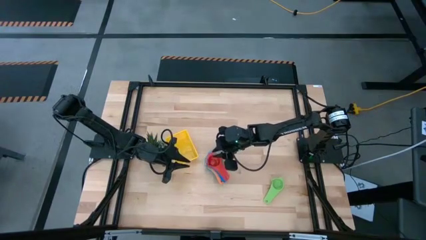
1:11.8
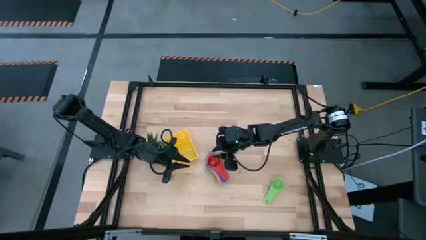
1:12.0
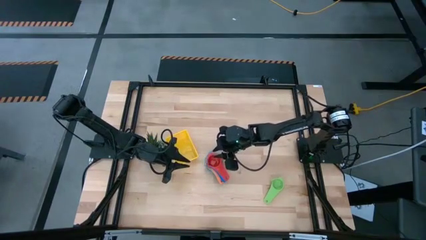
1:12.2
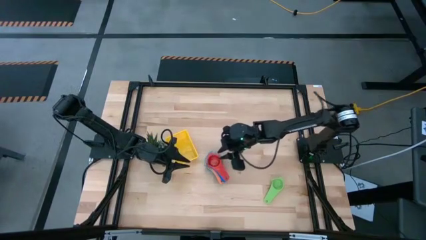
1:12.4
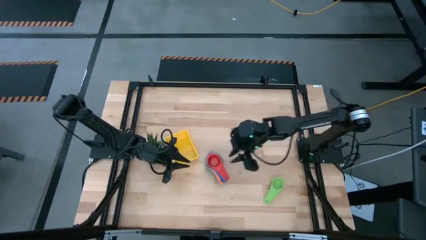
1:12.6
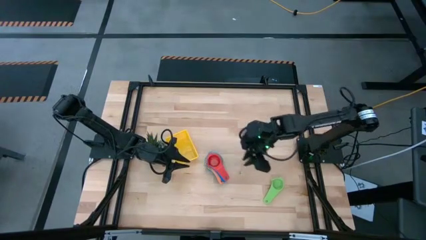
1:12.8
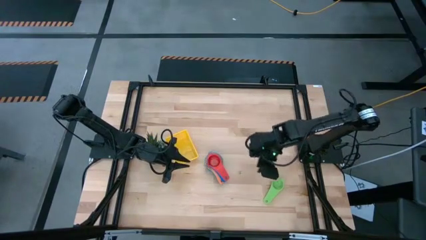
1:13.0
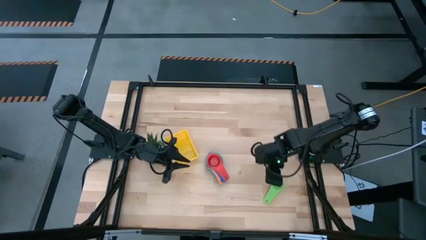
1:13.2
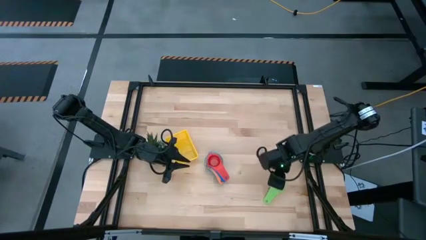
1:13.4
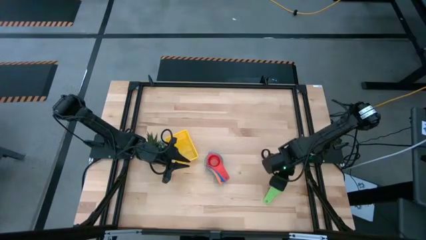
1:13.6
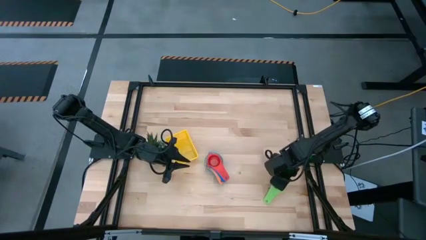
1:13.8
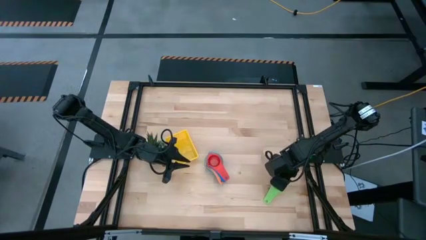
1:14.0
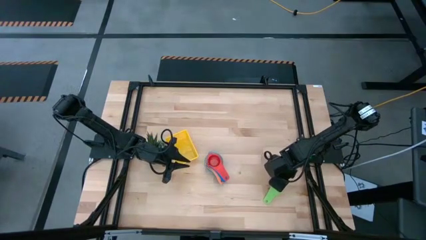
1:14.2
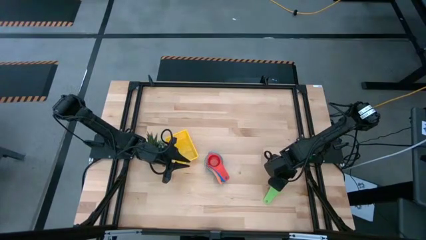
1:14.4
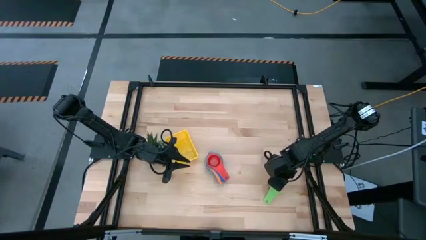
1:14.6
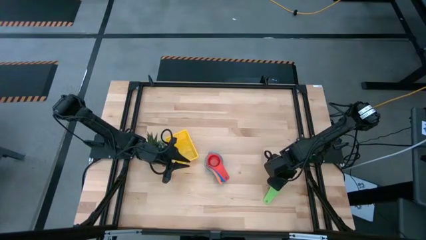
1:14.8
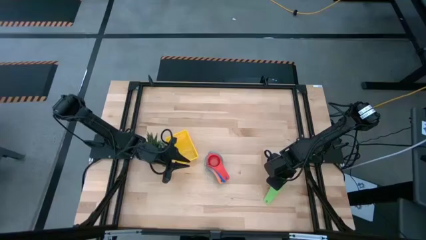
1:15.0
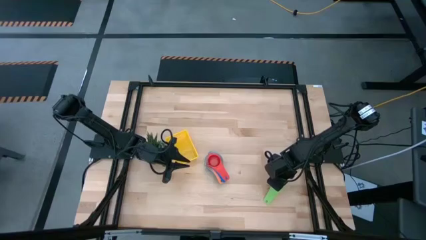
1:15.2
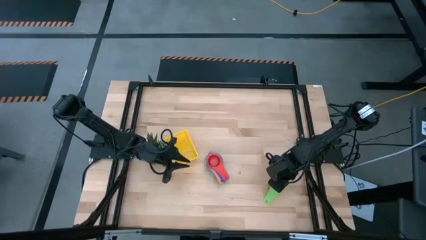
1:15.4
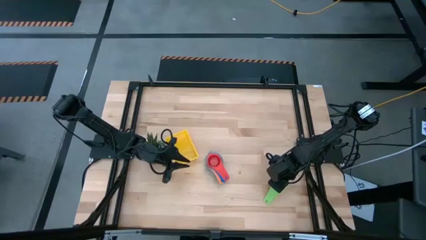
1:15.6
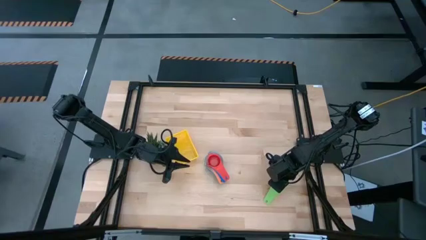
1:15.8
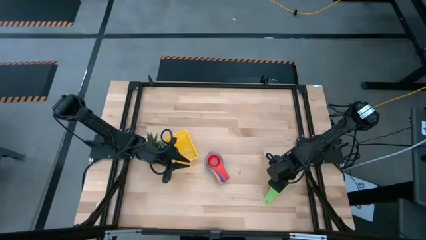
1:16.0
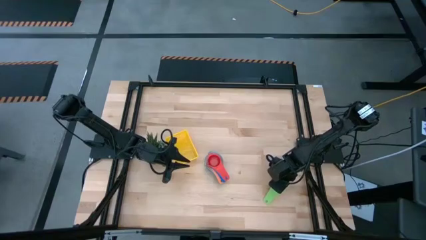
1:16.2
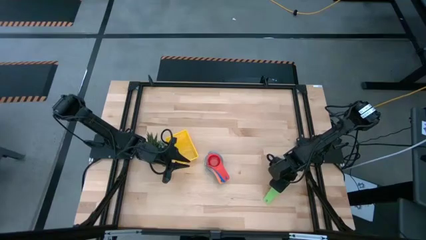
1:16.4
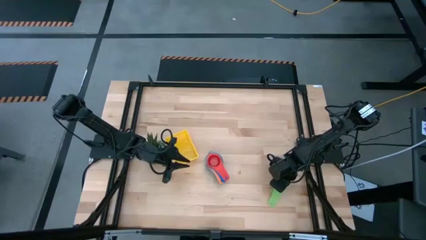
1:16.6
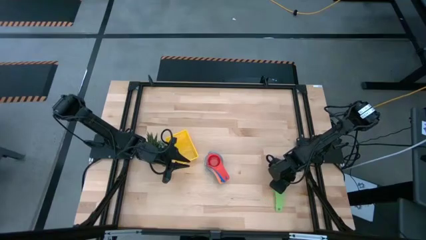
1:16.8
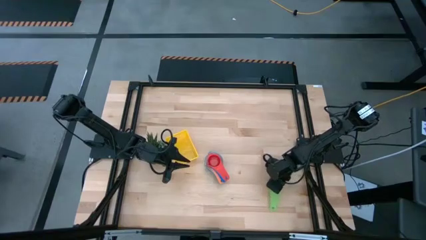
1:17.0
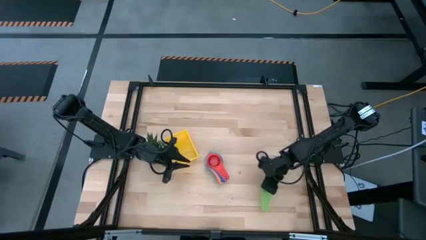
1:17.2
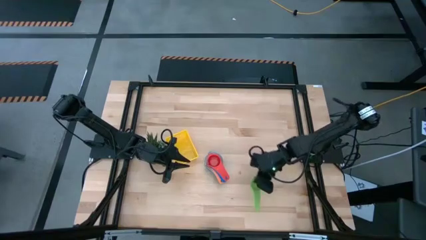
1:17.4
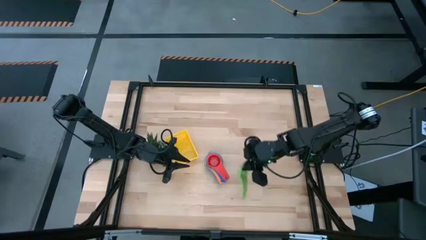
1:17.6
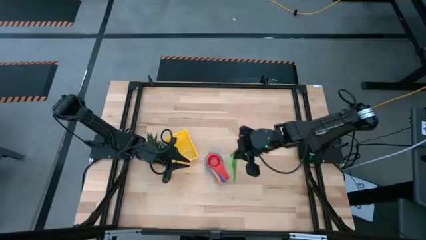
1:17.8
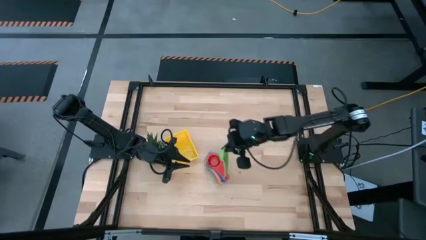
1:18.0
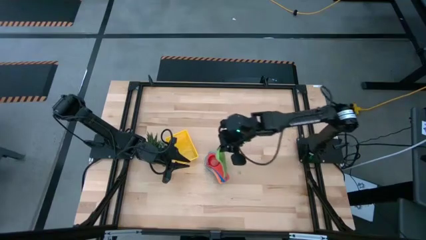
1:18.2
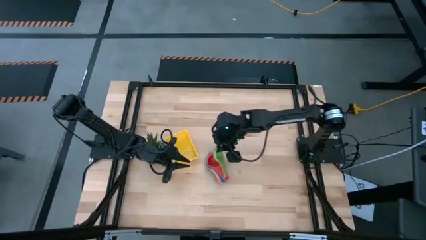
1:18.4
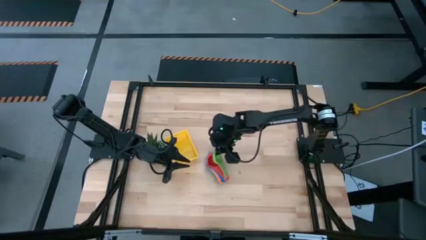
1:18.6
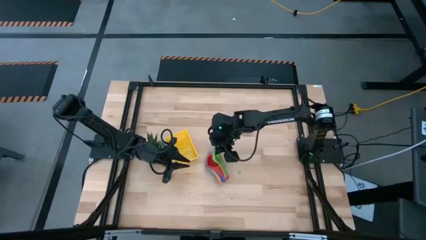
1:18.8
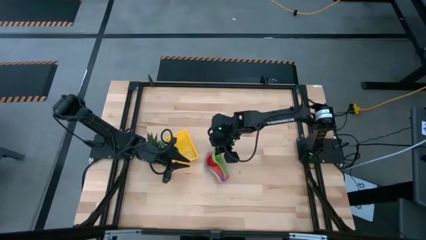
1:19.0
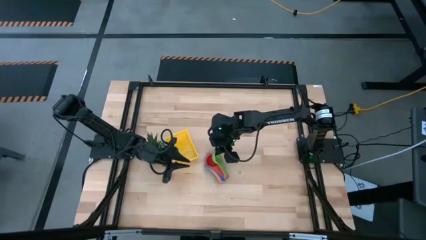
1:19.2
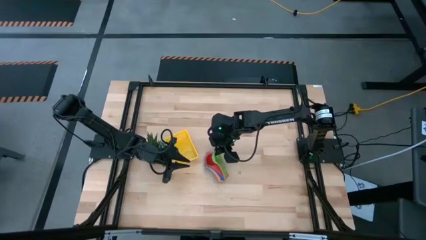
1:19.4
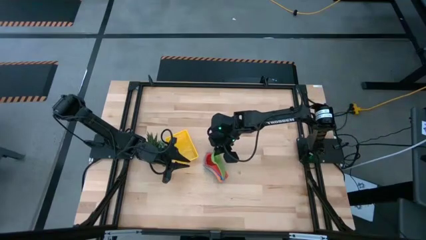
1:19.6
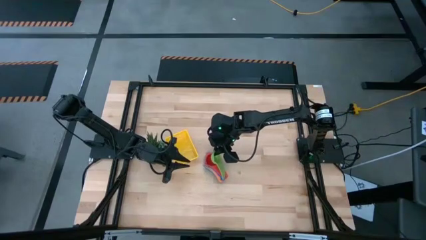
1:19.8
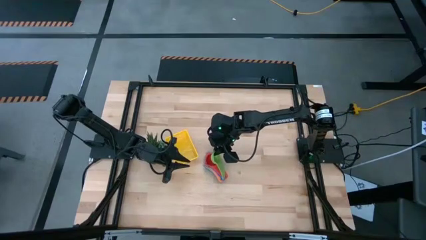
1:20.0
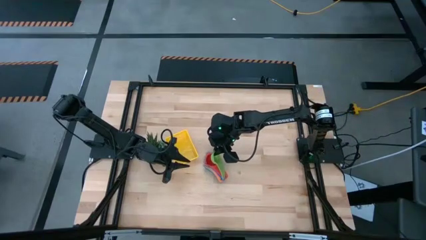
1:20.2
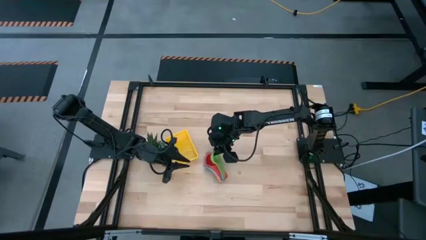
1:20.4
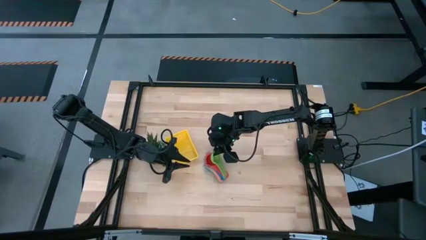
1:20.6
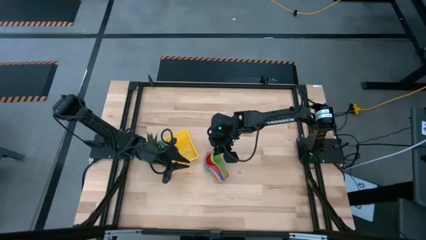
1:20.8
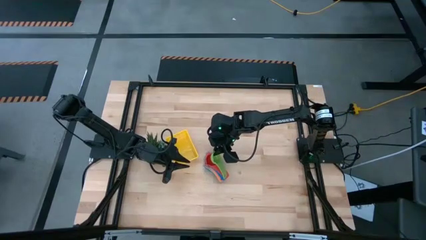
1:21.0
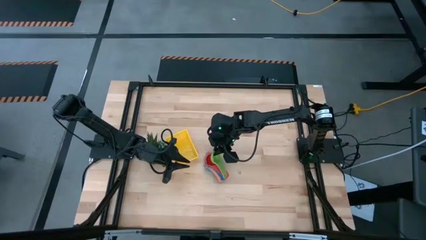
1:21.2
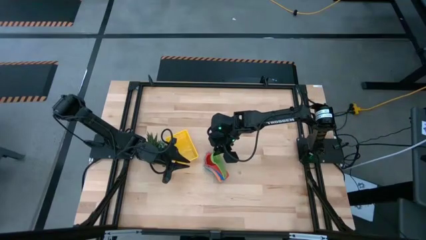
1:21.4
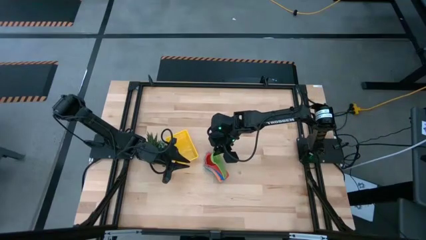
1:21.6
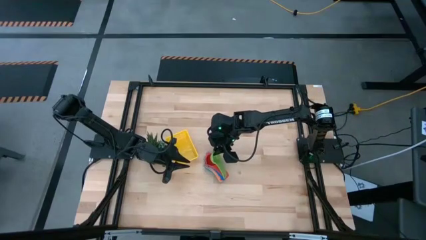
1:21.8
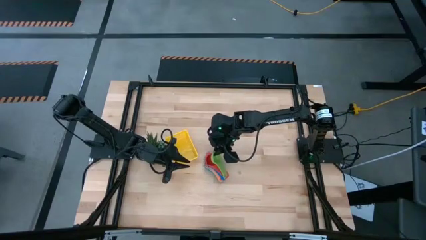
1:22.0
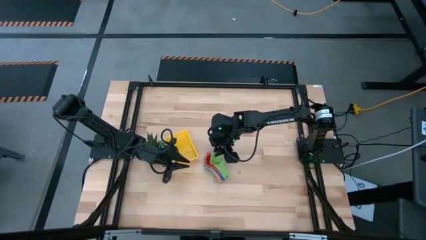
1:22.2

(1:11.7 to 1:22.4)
Task: Nest measuring cups in basket
Stack the green measuring cup on top of the red measuring cup

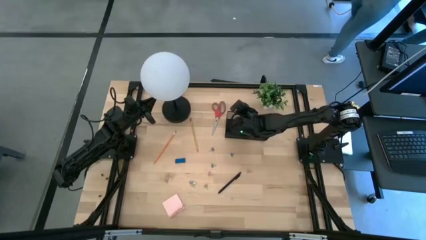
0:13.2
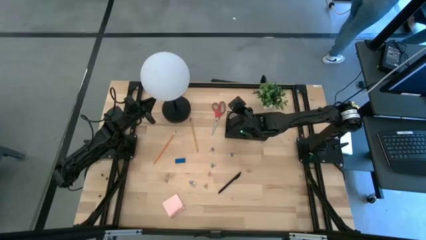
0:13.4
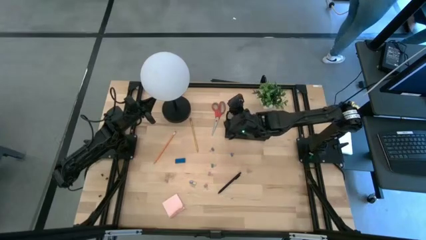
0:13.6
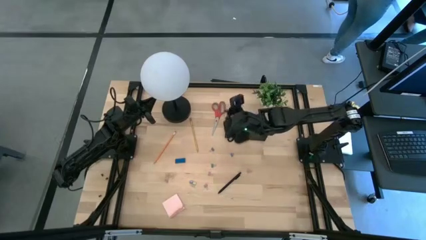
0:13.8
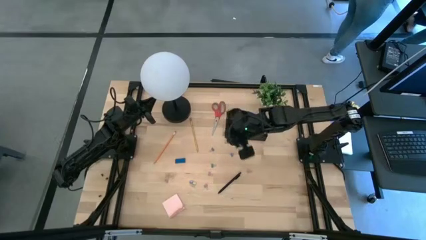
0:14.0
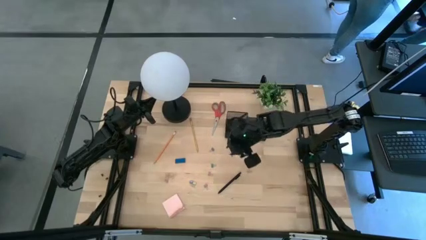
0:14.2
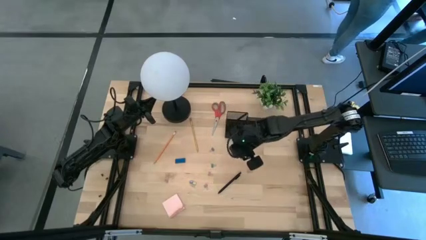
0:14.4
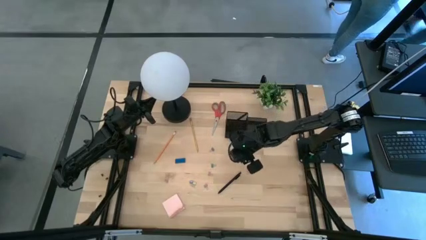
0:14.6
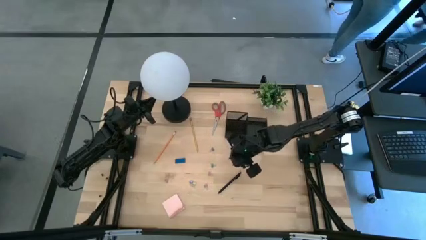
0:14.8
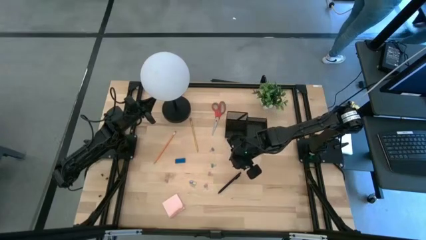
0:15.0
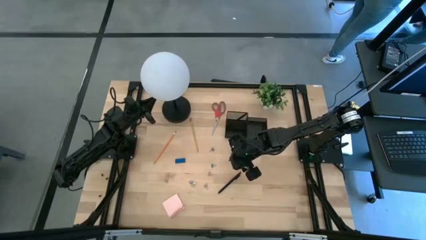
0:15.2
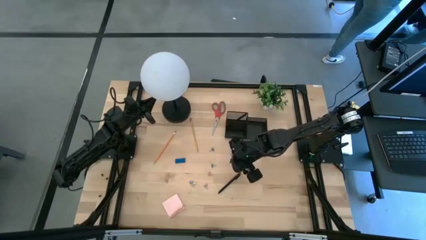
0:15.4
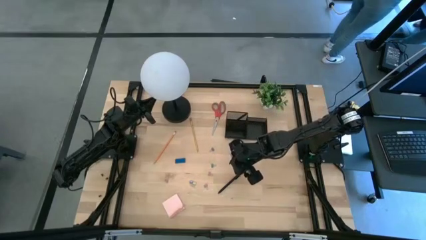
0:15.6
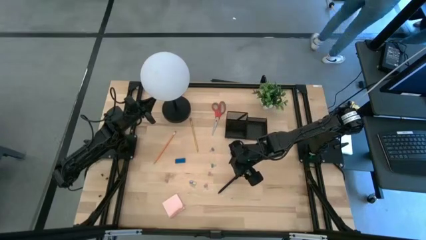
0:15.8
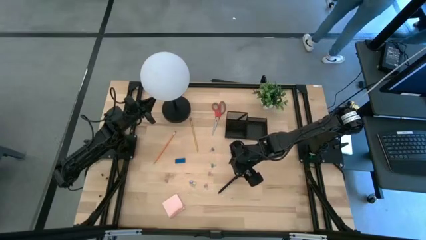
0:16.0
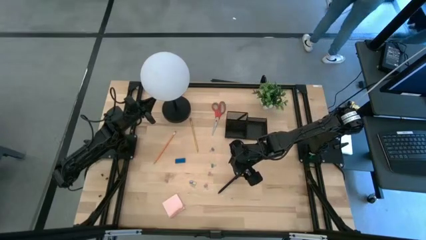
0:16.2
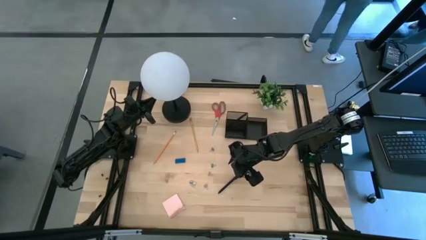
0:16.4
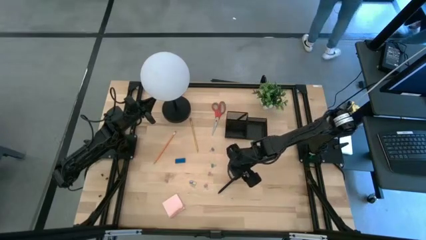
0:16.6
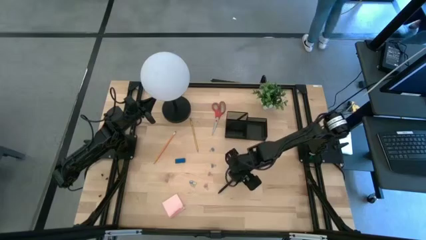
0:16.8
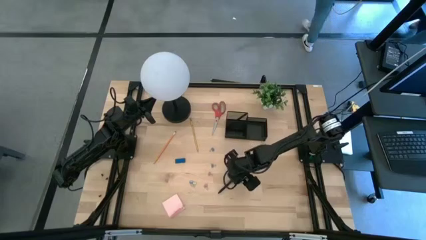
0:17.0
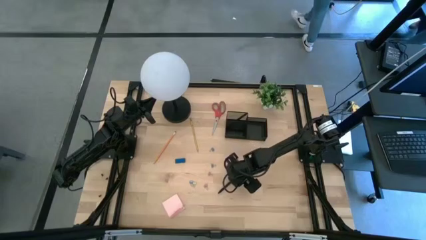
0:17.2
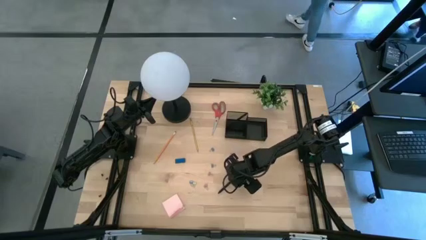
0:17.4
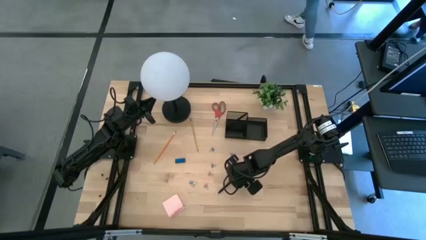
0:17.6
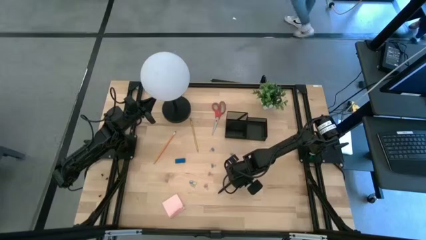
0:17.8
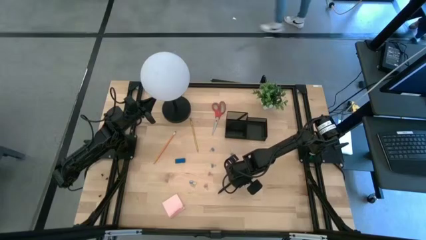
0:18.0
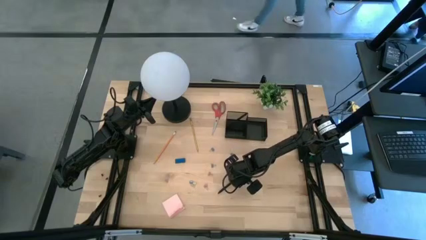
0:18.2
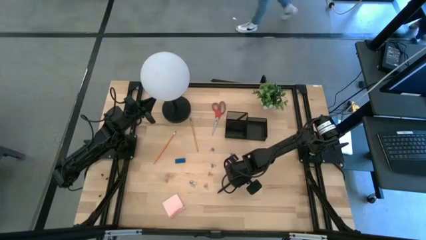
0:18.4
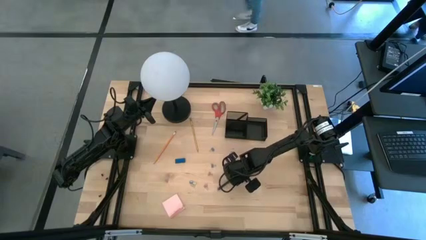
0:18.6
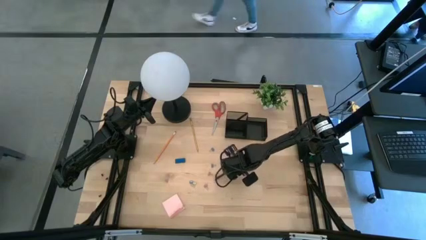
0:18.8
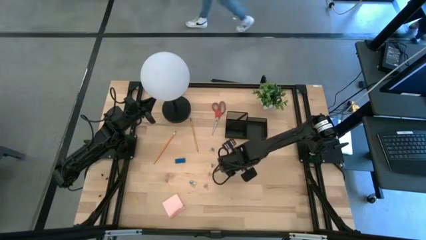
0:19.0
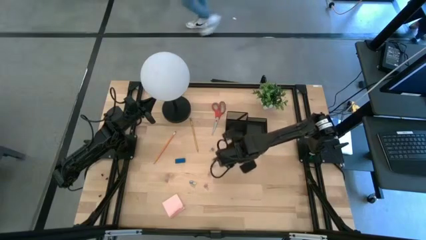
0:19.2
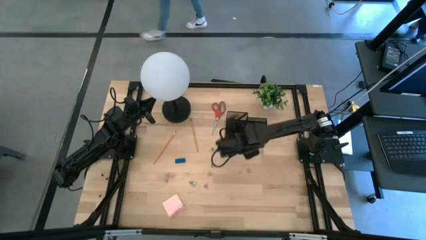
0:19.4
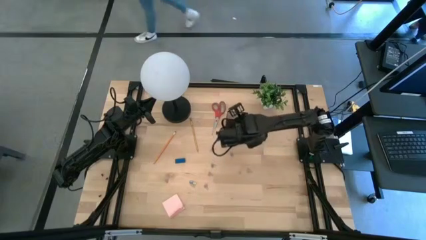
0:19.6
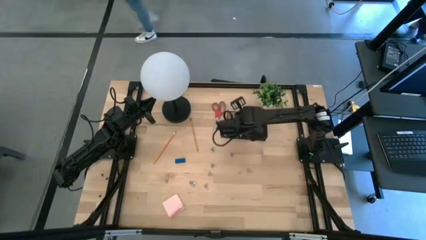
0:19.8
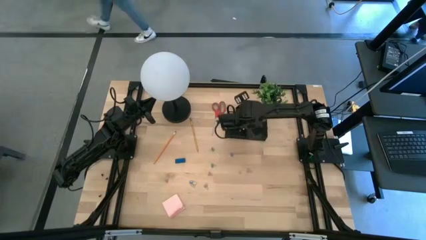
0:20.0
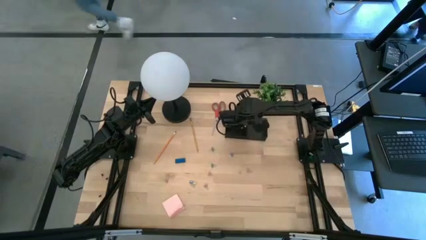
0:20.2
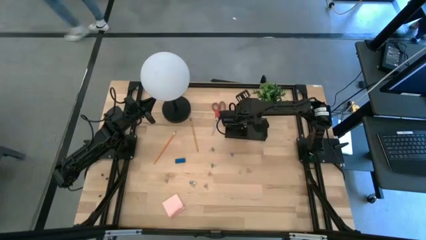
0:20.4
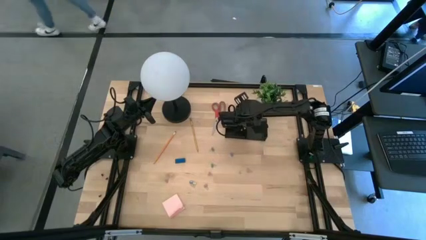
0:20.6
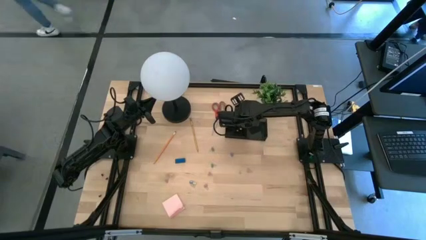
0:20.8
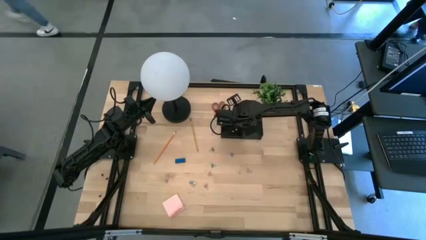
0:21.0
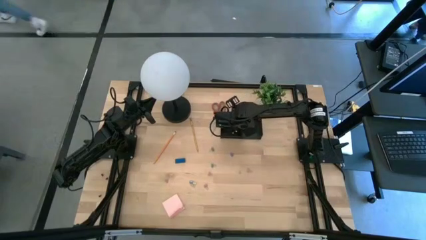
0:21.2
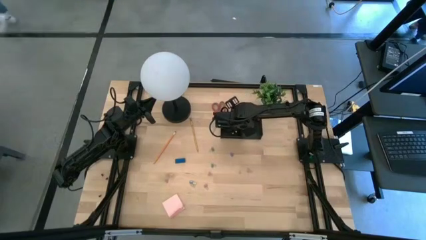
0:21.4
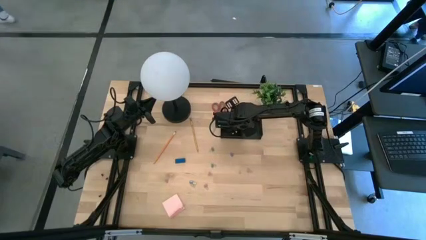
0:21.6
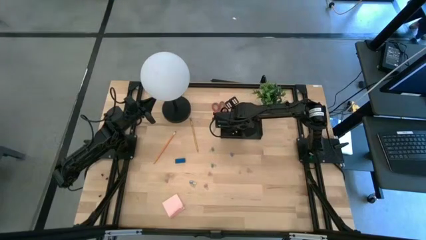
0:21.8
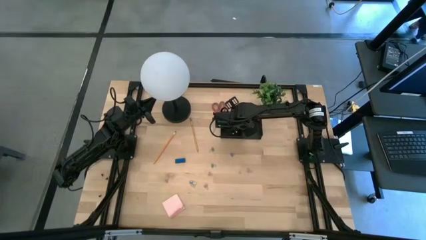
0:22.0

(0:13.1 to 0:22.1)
Task: Pick and place office supplies into organizer
Put the black pen into the black desk organizer
